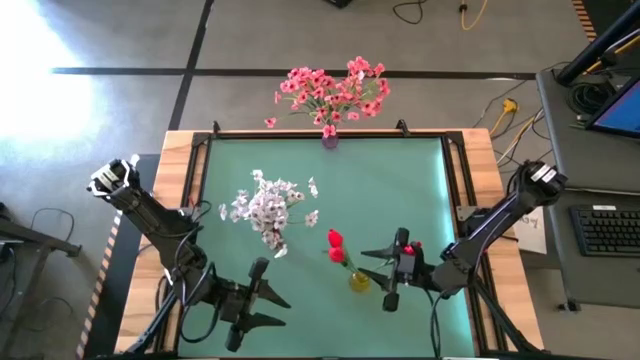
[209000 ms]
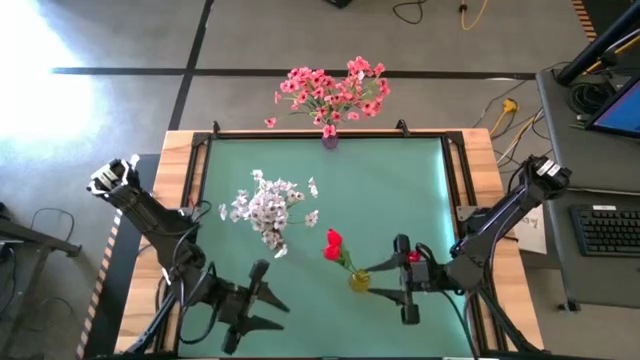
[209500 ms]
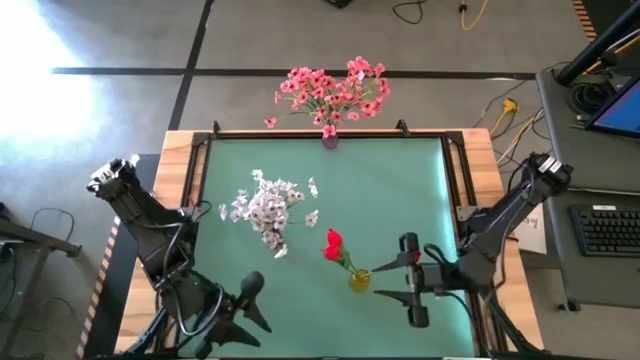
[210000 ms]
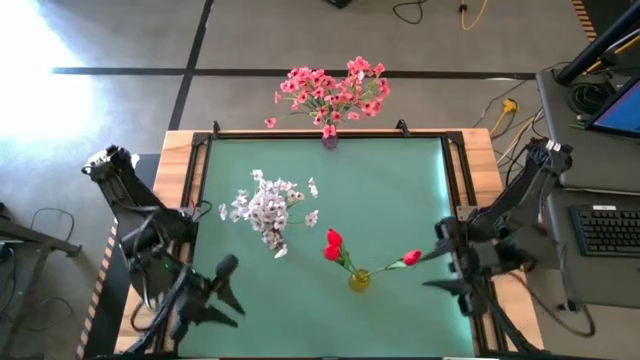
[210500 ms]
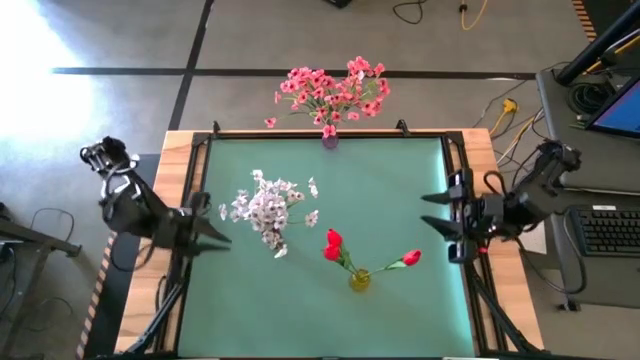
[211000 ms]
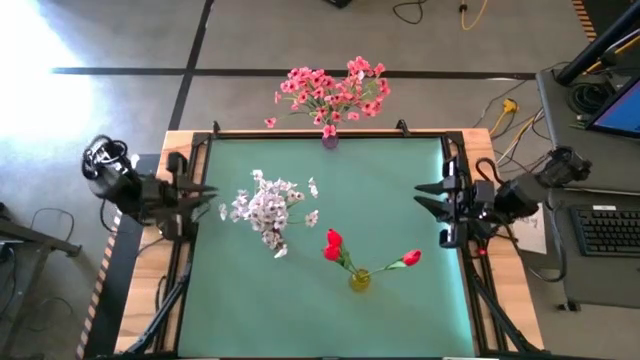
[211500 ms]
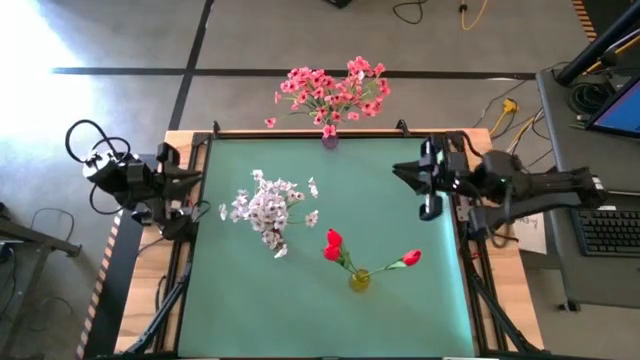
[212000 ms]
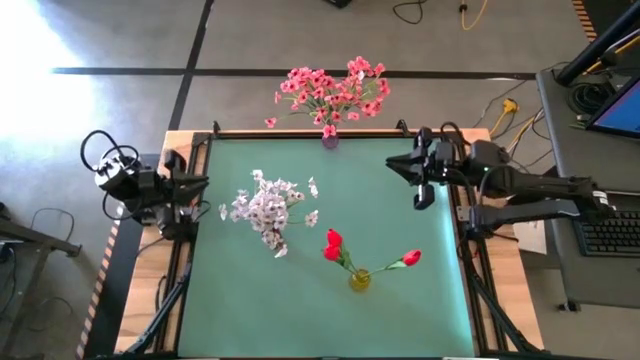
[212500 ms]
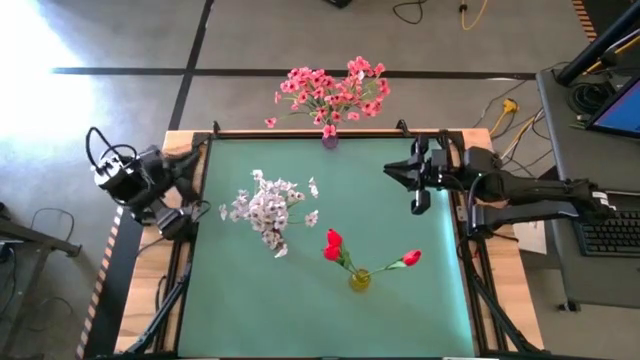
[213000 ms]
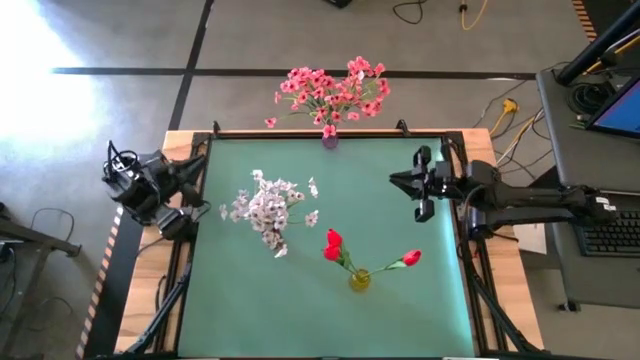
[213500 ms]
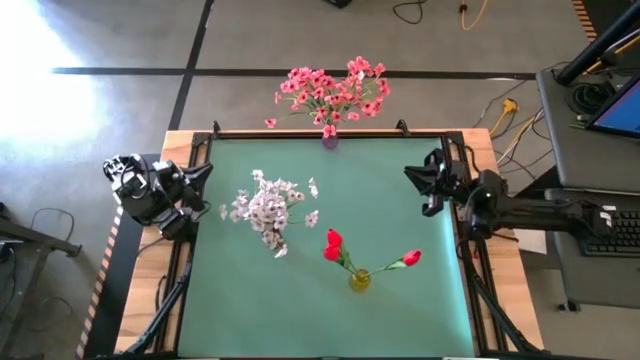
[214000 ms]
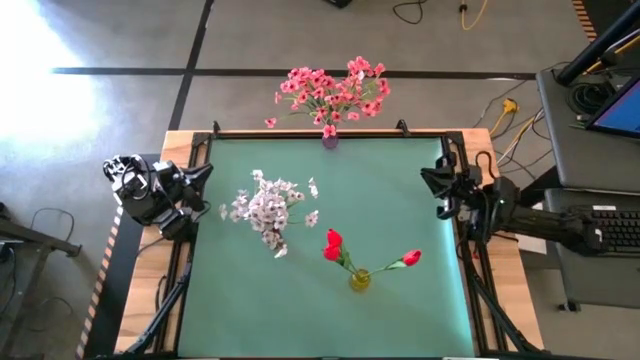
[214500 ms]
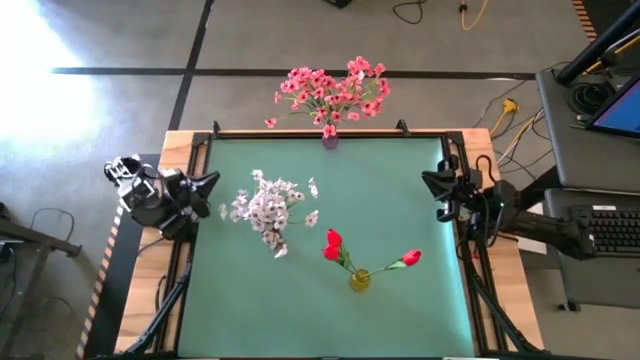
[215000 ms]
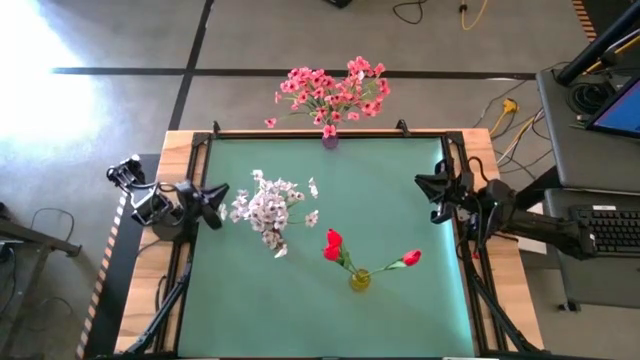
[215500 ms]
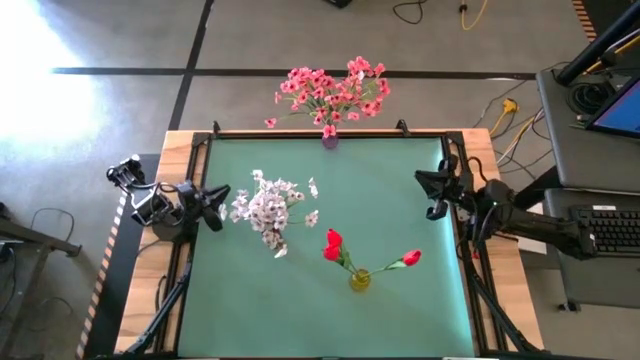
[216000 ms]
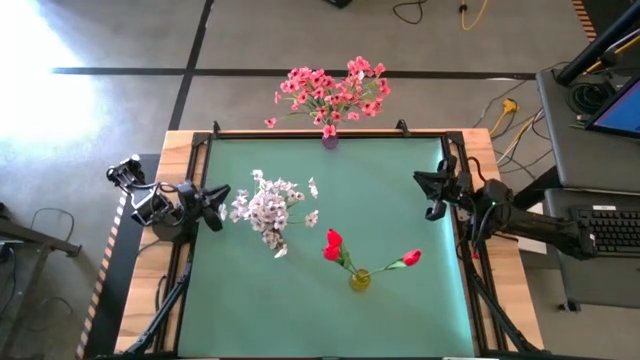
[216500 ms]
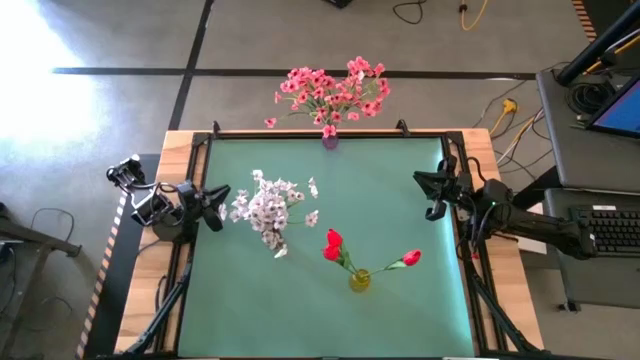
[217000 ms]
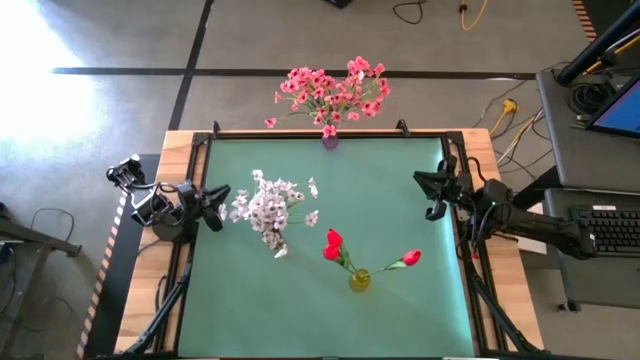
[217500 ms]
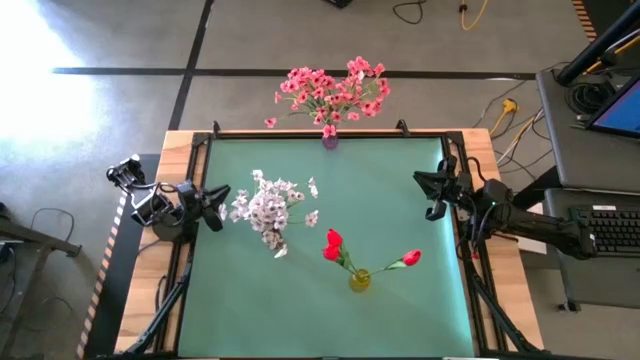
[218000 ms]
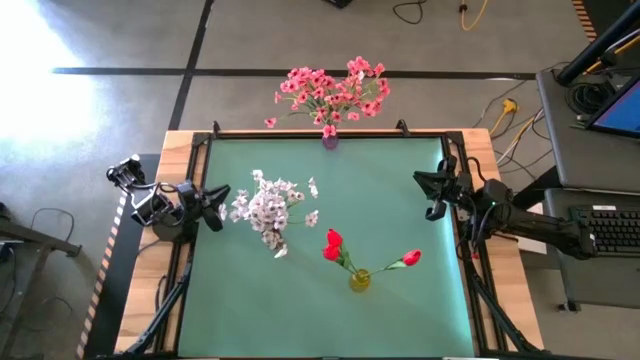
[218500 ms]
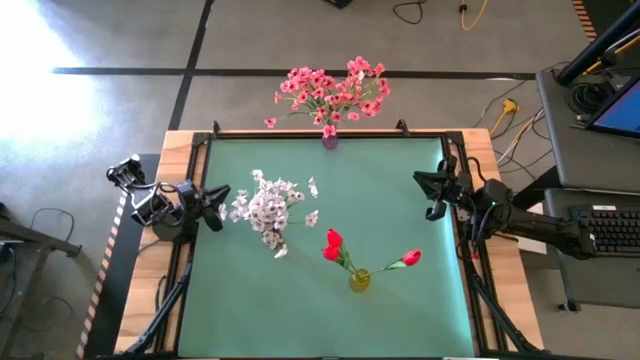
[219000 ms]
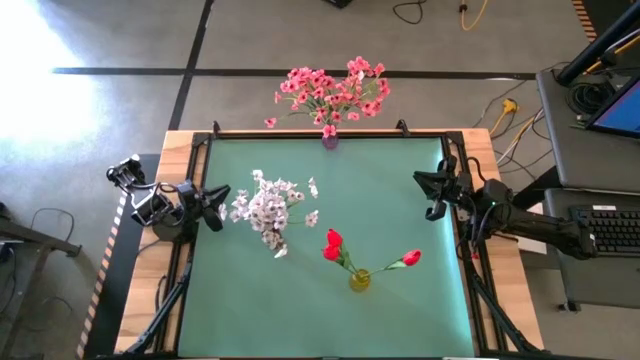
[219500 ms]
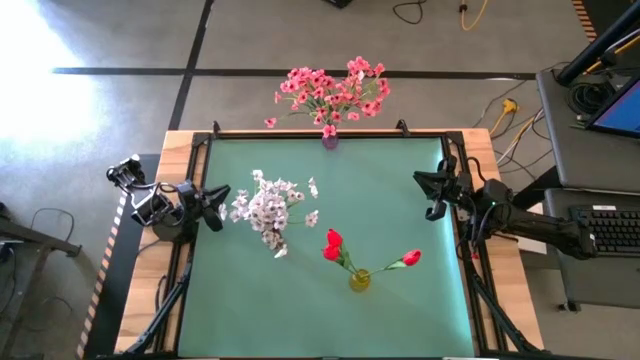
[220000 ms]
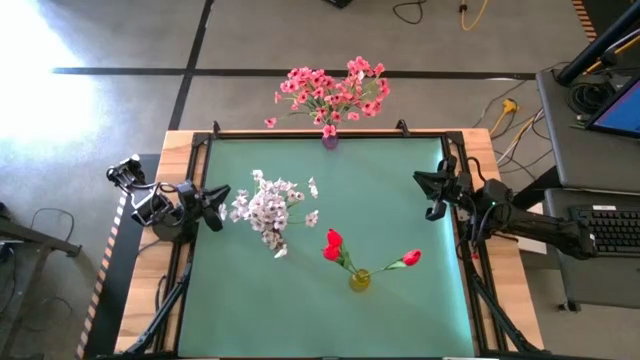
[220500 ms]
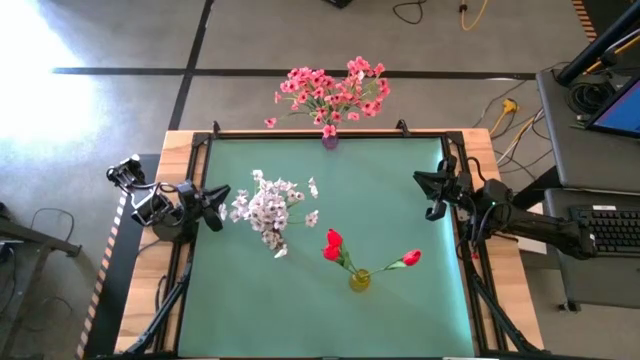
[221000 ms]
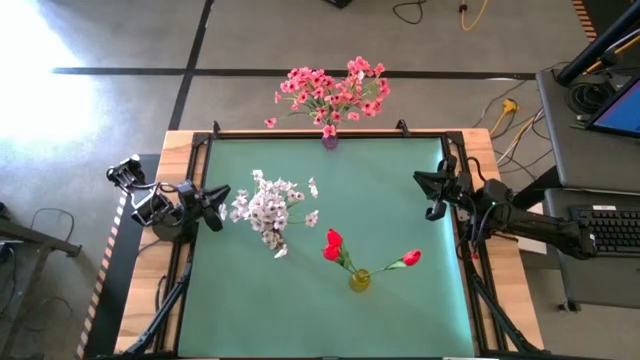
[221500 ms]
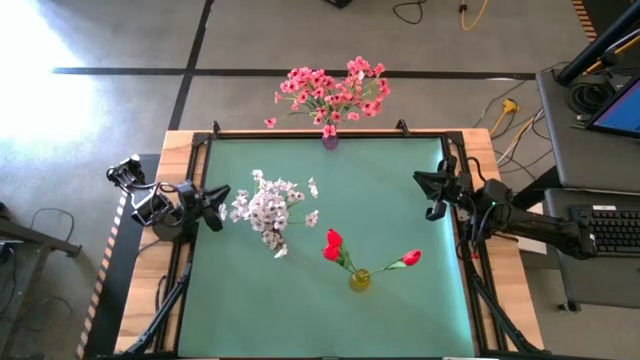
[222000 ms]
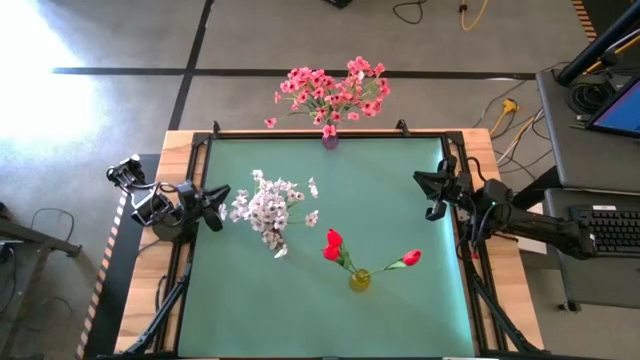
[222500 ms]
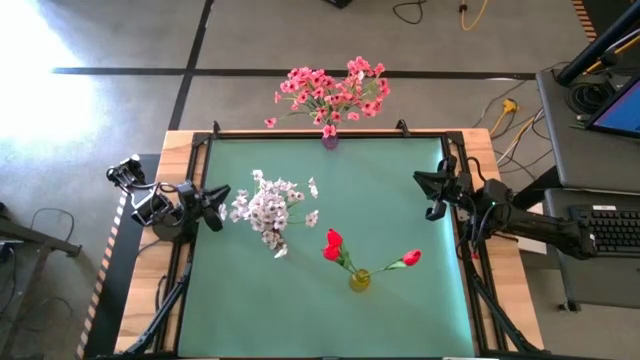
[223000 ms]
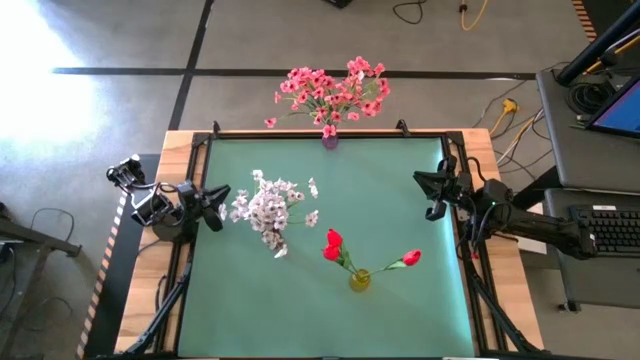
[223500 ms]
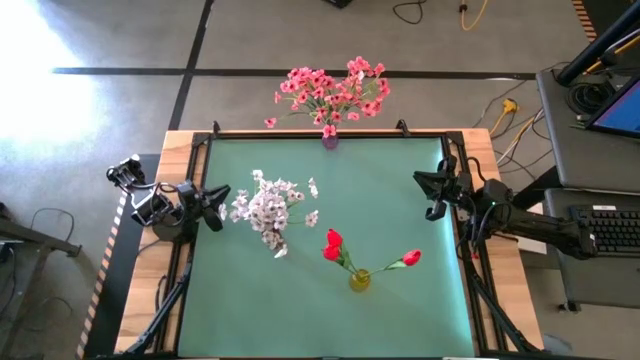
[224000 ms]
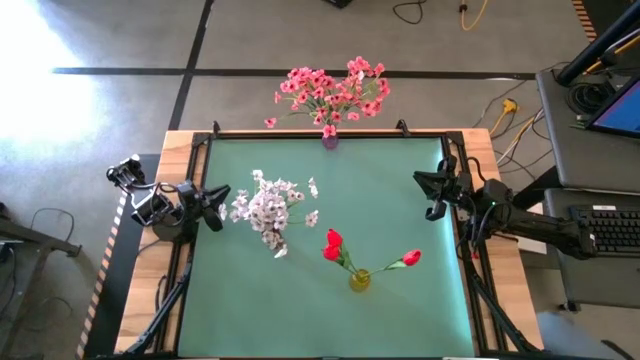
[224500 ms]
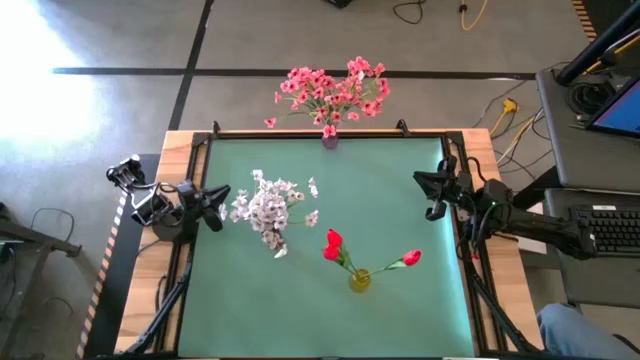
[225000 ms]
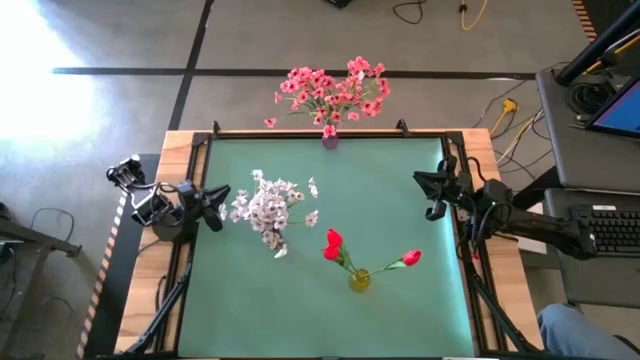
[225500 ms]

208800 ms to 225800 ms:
Task: Sort flowers into vase by color
Return to Home Position

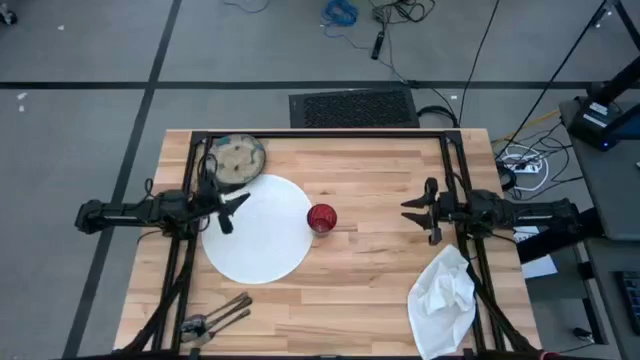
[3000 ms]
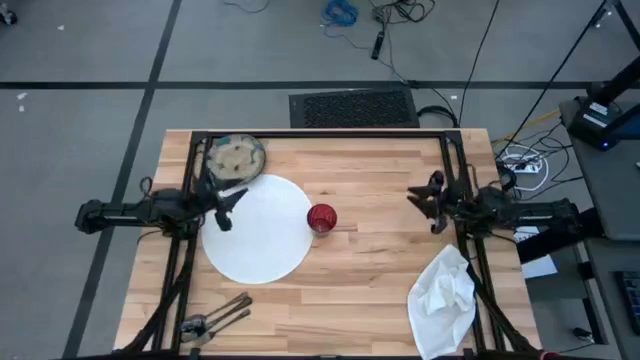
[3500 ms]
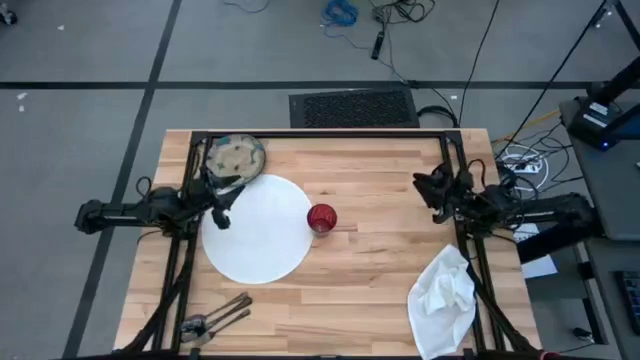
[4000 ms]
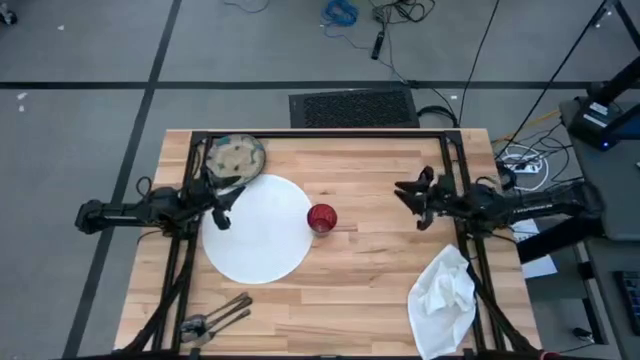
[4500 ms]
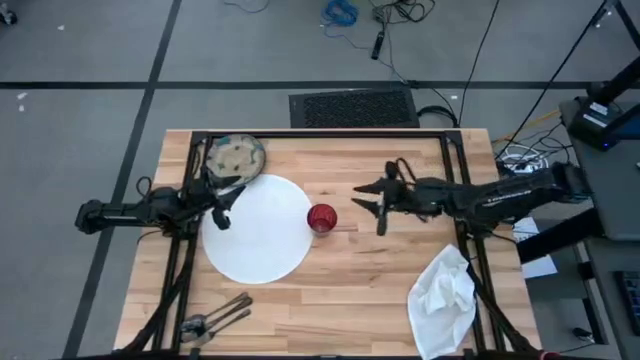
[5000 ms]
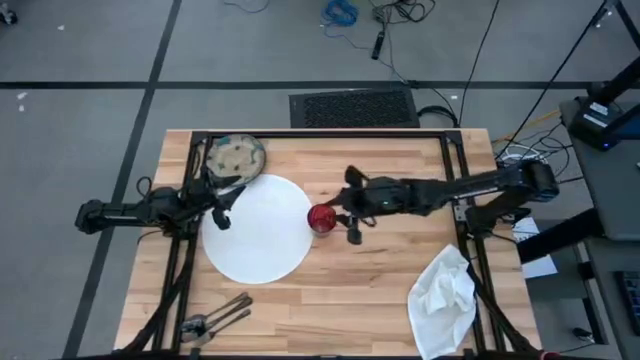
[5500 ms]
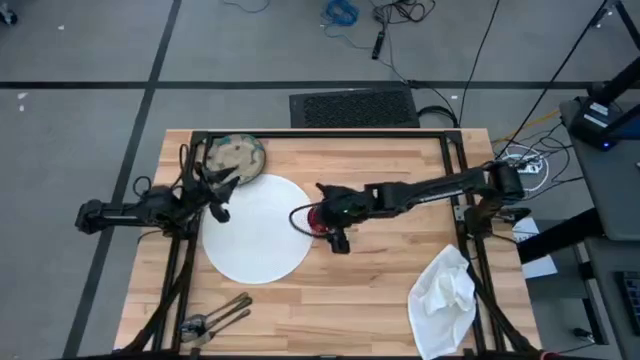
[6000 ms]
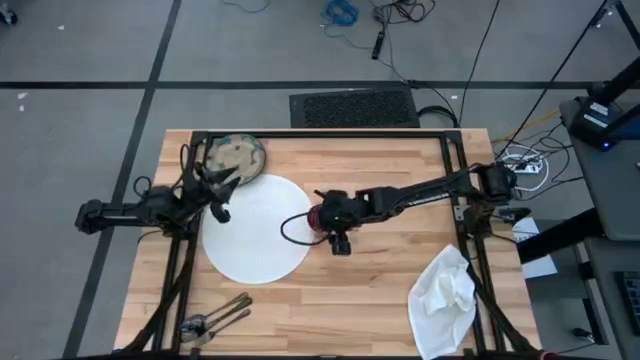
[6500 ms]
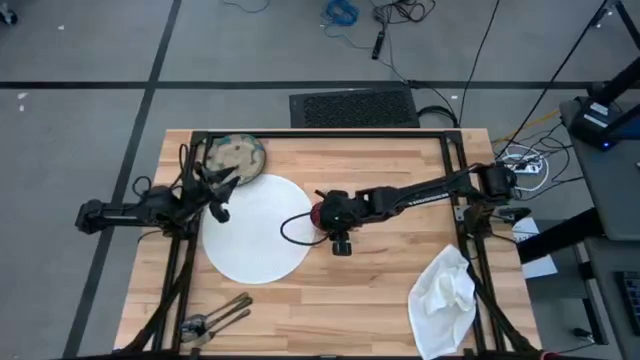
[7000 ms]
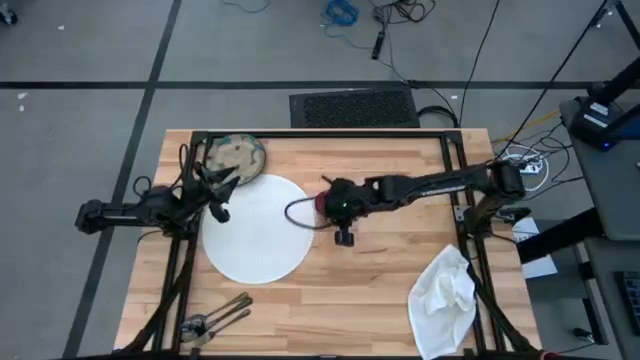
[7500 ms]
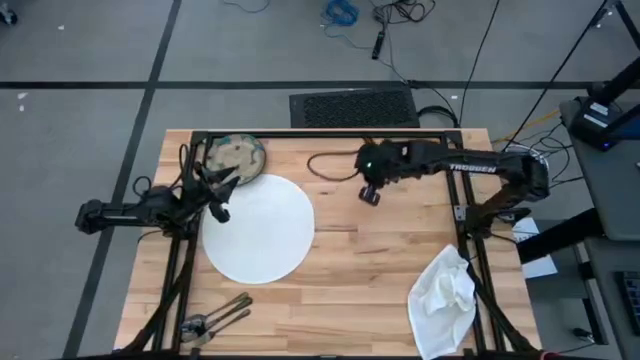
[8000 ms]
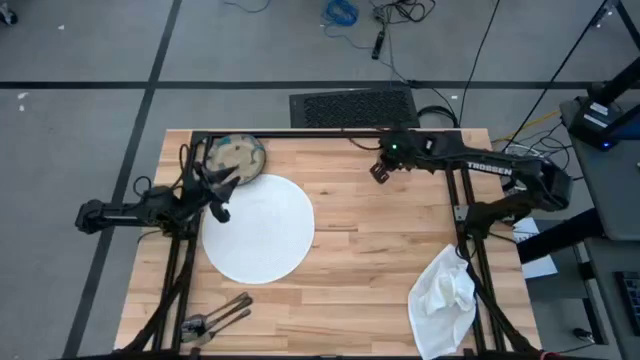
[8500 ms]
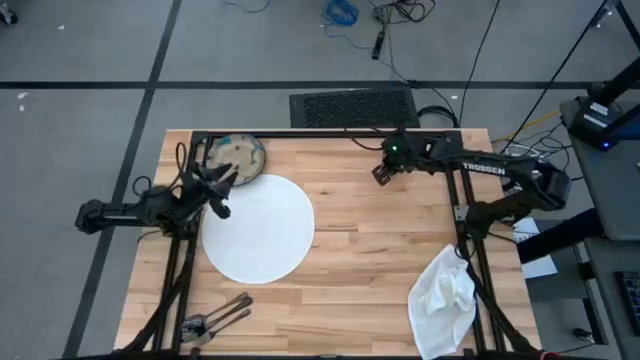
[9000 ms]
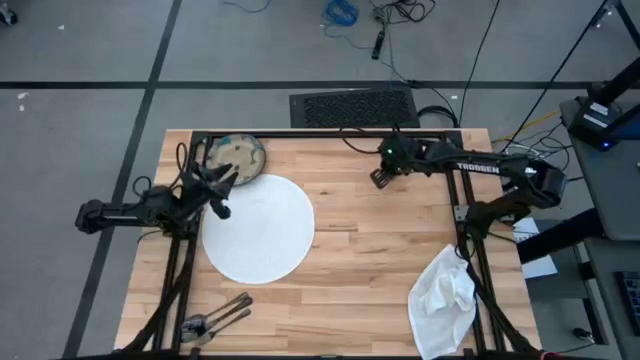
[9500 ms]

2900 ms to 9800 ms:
Task: Set table place
Move the red cup to the top right of the table
